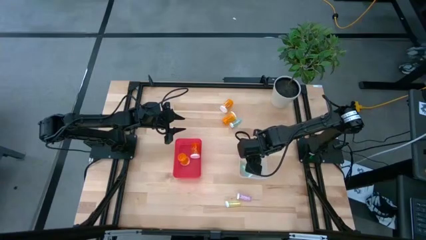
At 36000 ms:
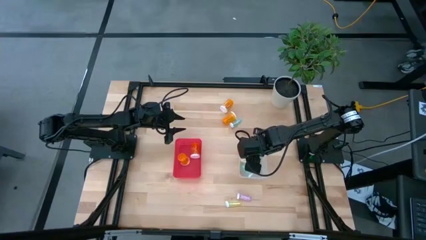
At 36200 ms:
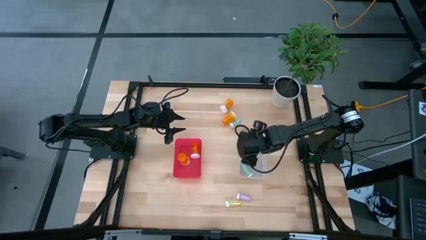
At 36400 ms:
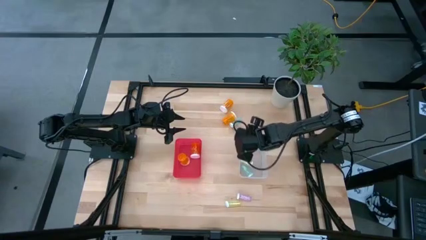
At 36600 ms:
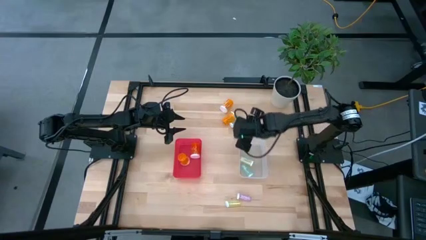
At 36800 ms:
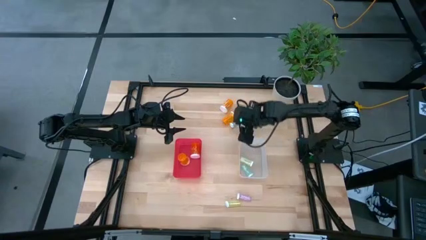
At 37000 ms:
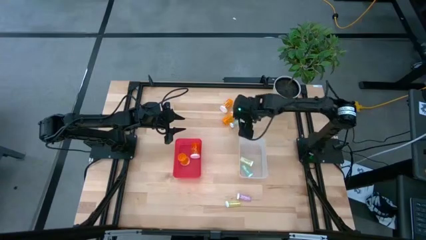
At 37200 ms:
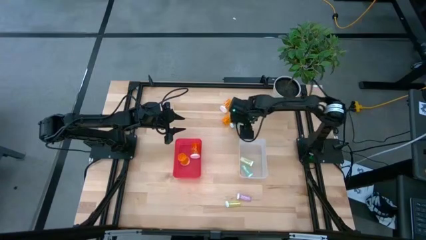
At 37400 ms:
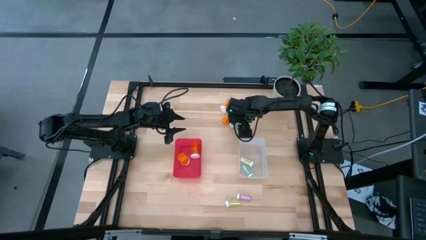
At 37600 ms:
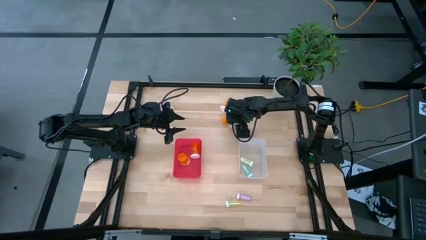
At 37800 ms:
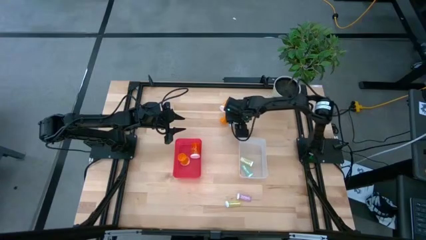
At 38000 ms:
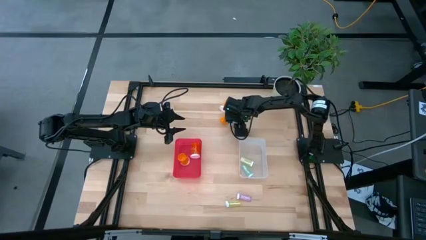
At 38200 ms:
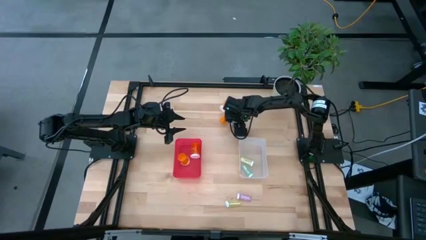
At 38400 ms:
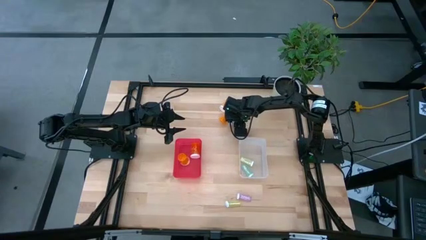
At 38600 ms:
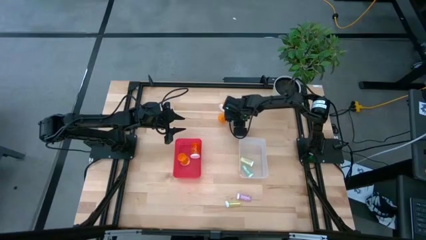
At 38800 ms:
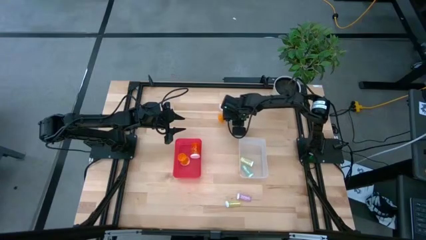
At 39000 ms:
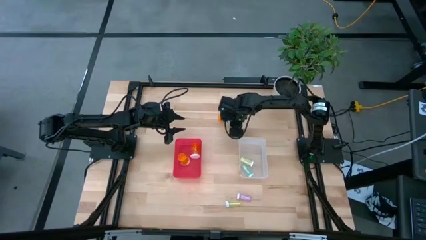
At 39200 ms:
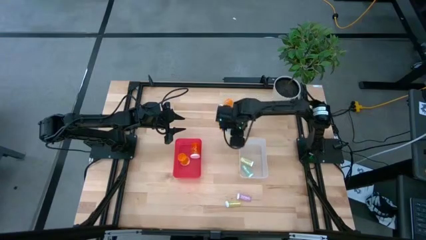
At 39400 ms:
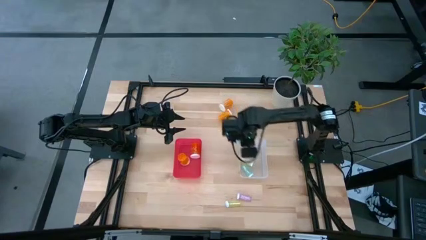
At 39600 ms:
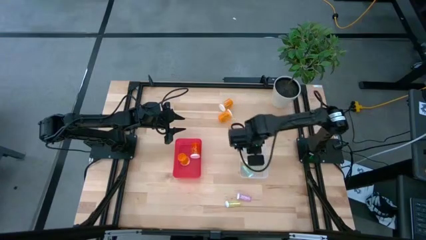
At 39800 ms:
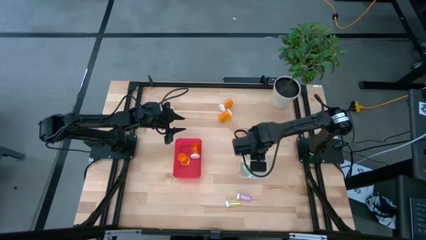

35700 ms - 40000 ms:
Task: Pick and place medicine bottles into bin by pill shape (circle, oval)
Put the small blue pill bottle into the white bin

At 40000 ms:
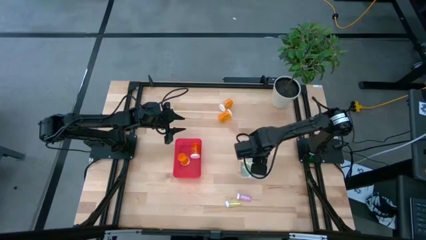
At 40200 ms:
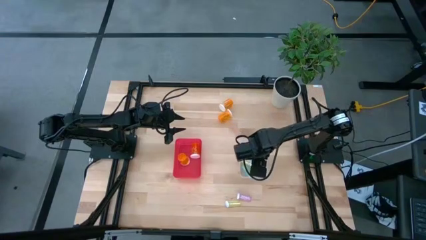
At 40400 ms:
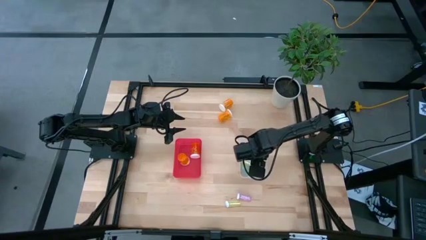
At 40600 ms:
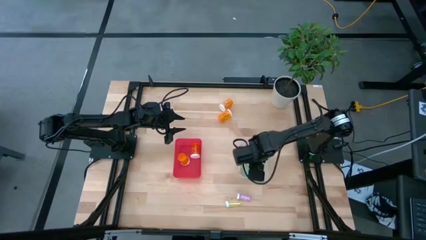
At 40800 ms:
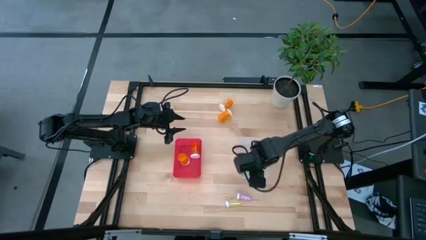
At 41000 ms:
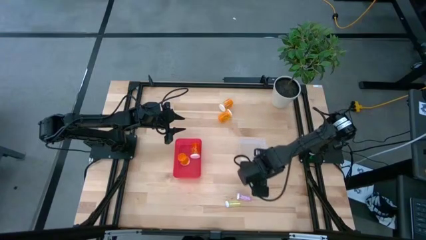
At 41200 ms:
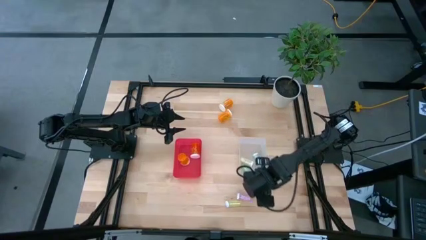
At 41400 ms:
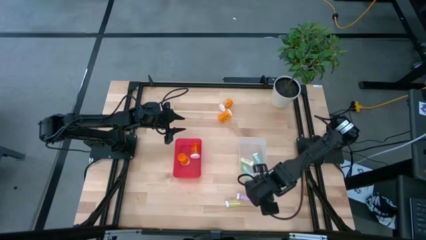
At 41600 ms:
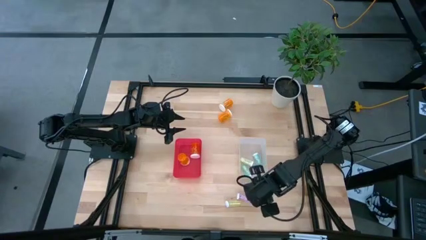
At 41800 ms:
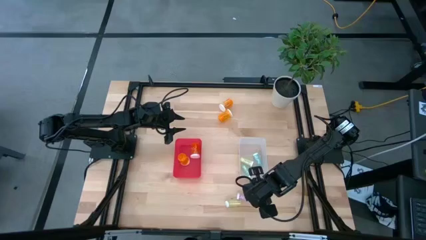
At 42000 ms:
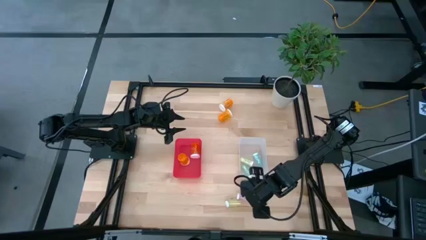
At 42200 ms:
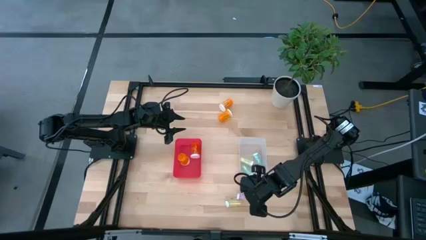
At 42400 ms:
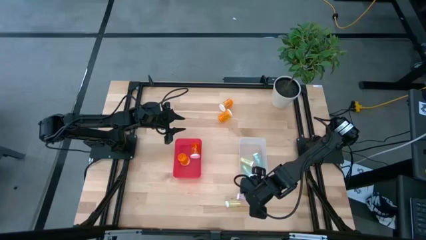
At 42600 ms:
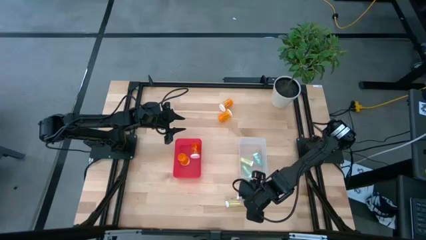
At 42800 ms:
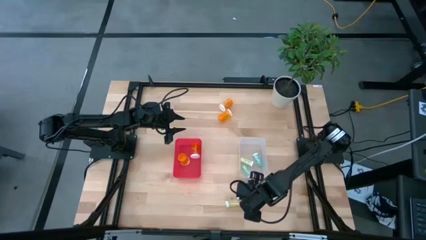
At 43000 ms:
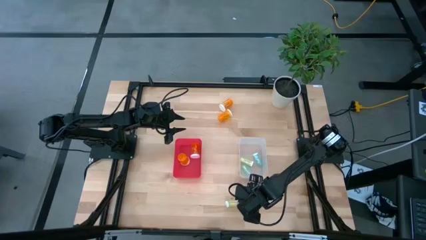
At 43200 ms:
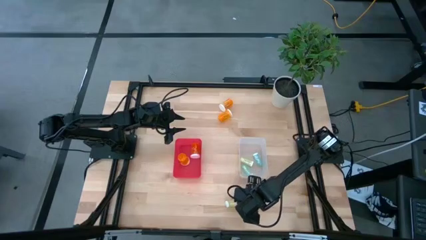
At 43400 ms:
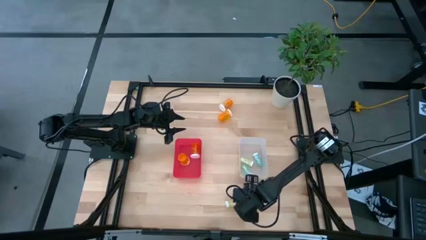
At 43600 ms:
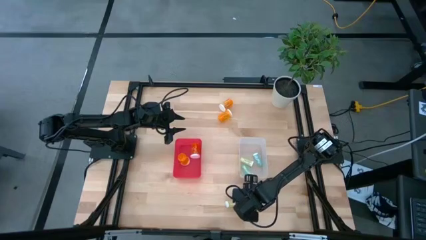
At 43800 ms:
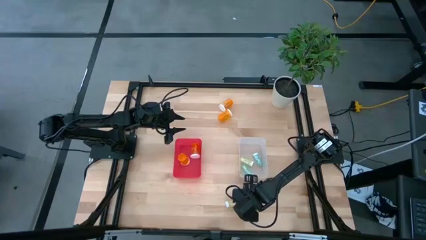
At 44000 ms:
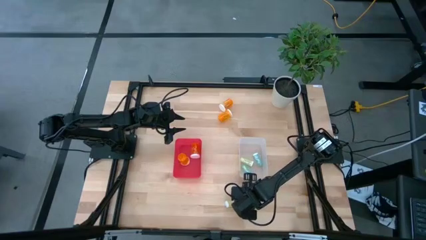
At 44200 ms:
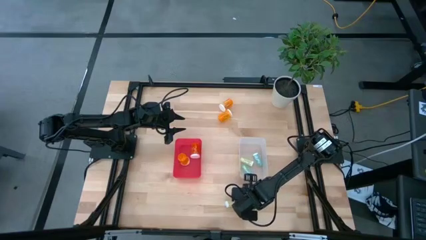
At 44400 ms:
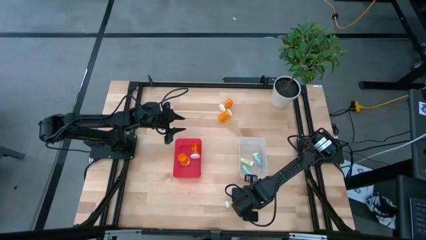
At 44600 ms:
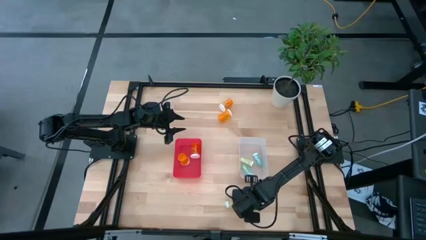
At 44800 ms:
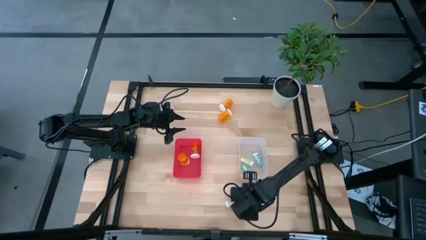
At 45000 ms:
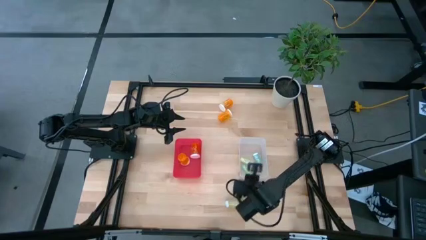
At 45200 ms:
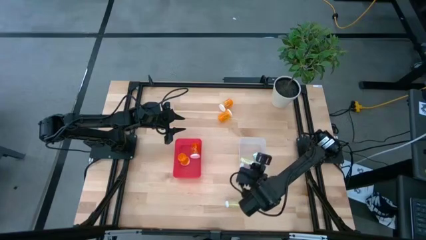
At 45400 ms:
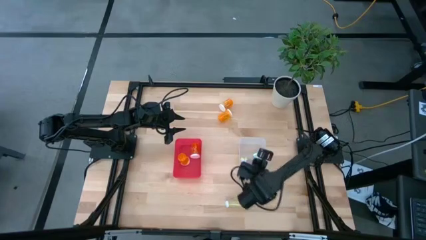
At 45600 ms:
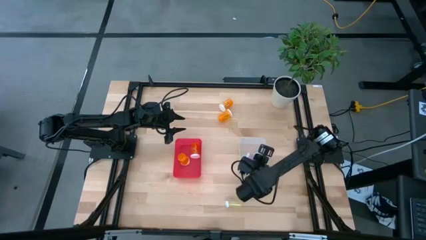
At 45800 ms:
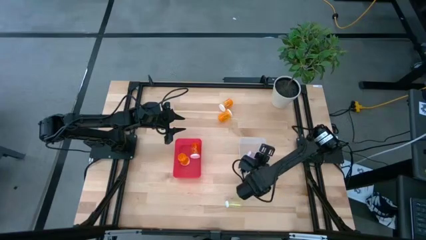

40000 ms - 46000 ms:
Put the small purple pill bottle into the white bin

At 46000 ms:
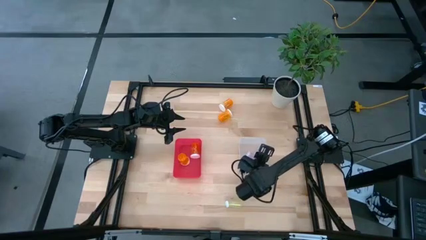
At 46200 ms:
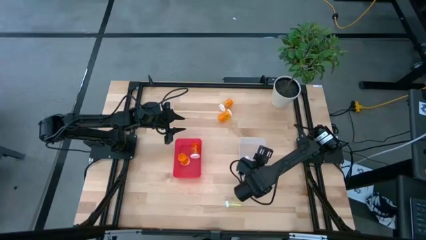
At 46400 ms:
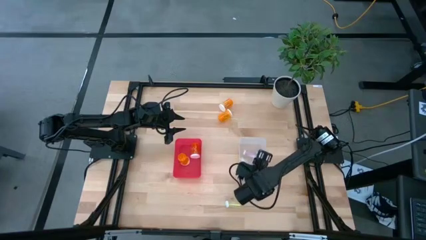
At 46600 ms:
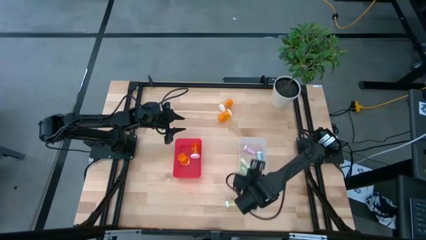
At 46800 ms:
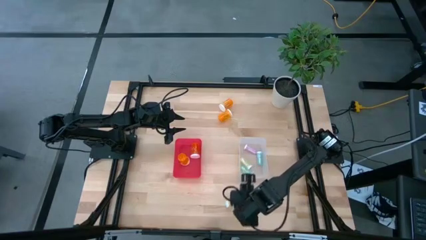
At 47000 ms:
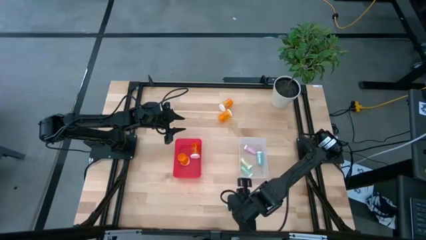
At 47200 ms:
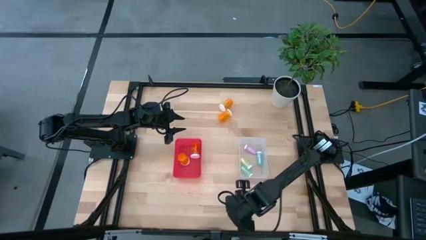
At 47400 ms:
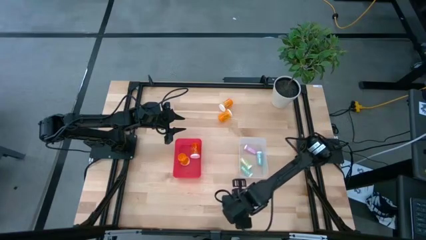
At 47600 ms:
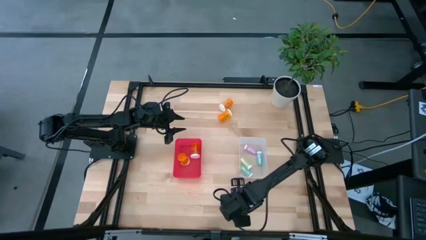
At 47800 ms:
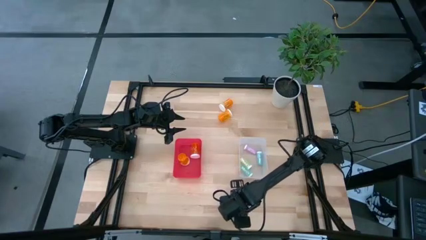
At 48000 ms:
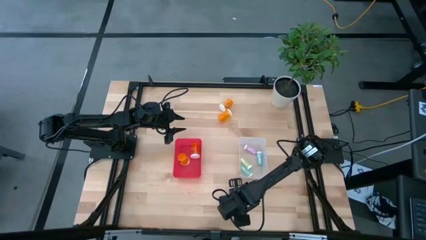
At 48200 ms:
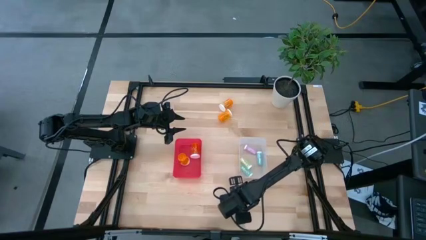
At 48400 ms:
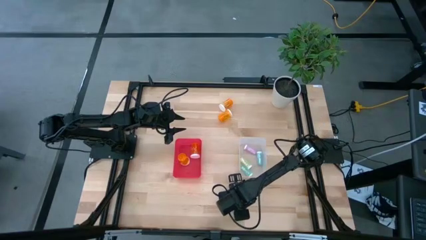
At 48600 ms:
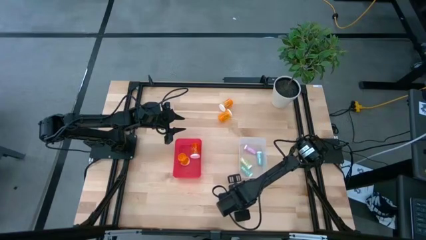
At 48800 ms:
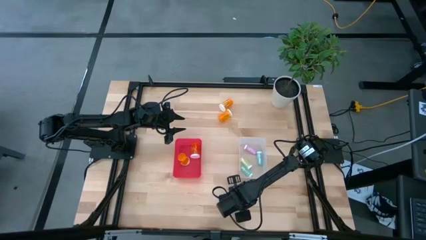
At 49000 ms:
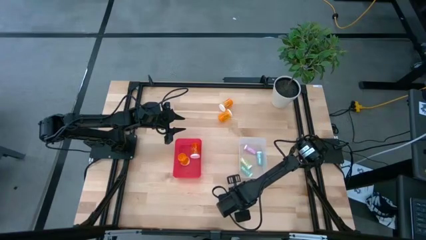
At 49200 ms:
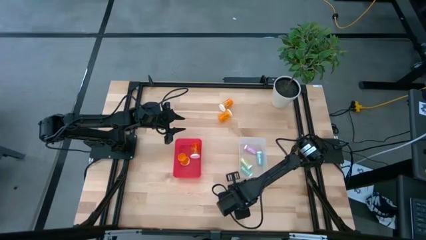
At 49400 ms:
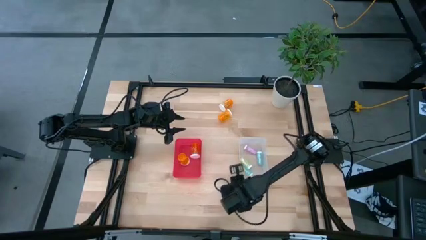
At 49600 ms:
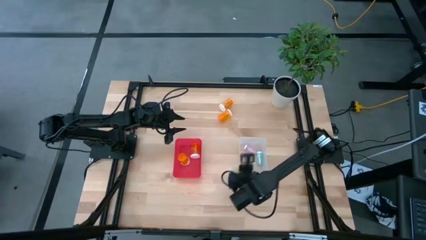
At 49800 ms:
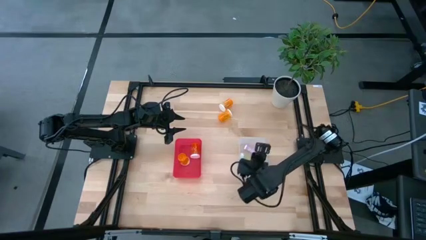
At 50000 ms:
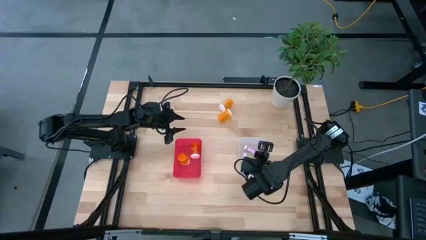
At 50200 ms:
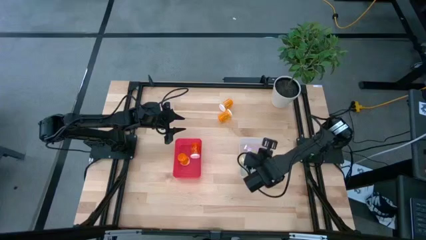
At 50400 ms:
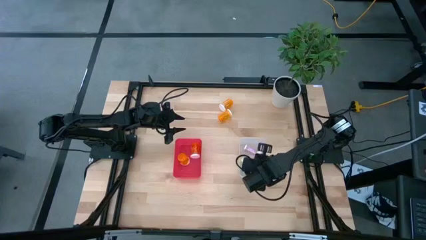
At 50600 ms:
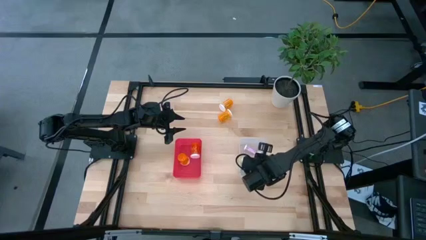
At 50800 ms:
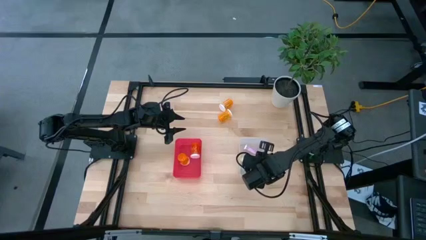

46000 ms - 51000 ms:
Put the small yellow pill bottle into the white bin

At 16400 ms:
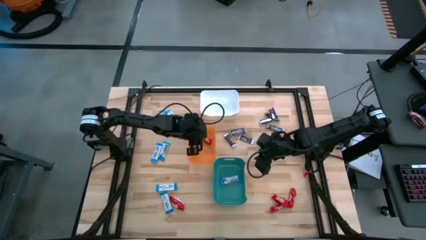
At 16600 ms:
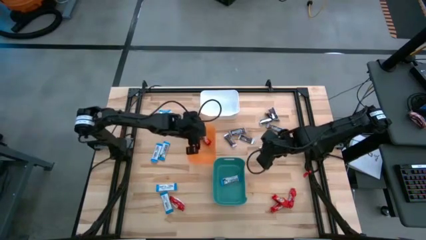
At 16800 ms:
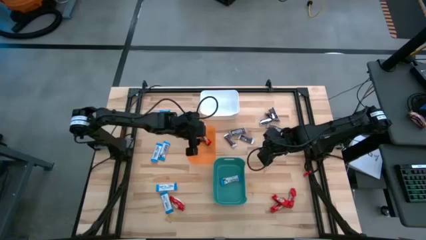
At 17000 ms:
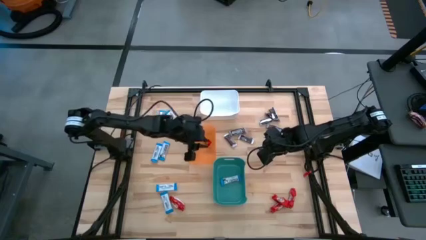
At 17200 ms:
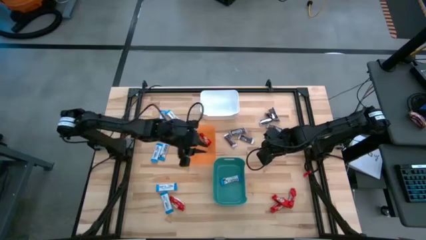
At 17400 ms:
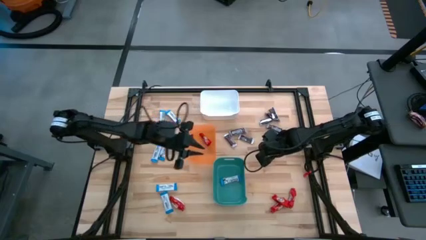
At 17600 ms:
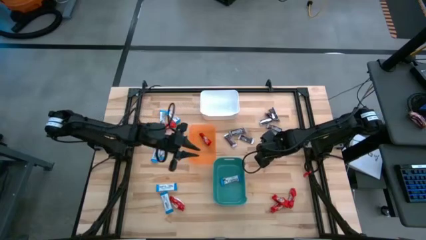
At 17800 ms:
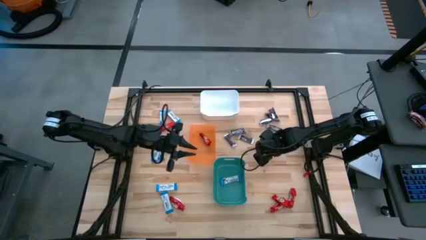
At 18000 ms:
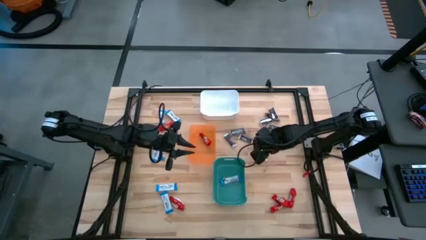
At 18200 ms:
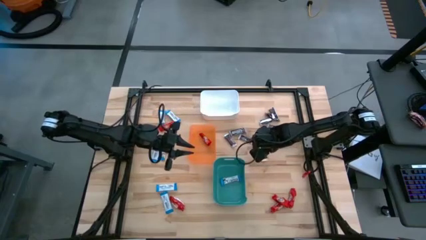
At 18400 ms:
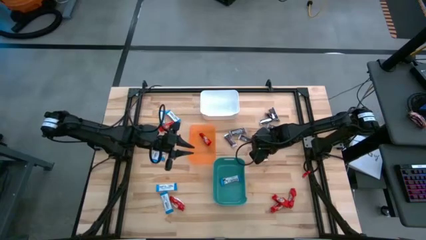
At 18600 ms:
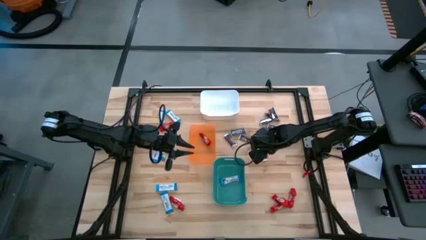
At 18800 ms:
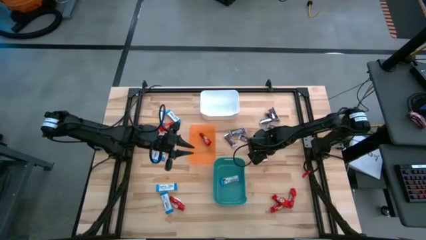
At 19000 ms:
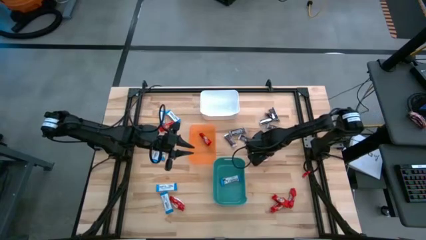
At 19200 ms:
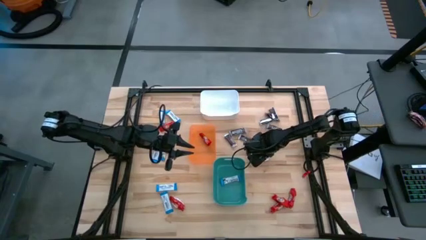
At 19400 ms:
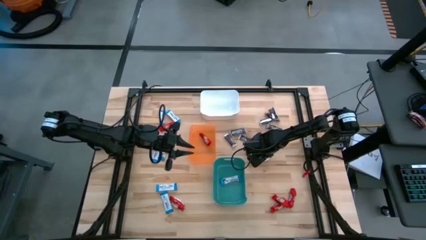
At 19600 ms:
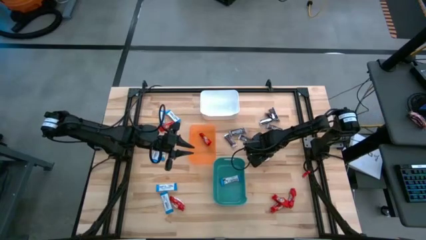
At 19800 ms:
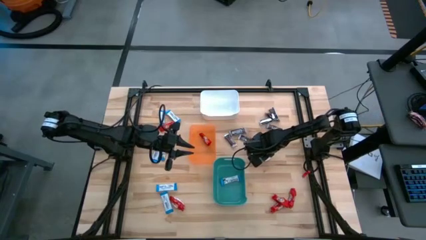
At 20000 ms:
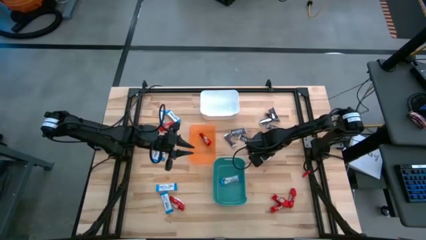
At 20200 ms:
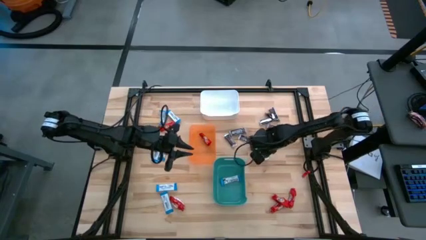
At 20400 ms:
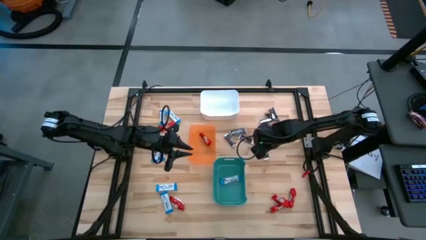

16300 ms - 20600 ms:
Task: Sort candy
Put the brown chocolate bar into the white bin
